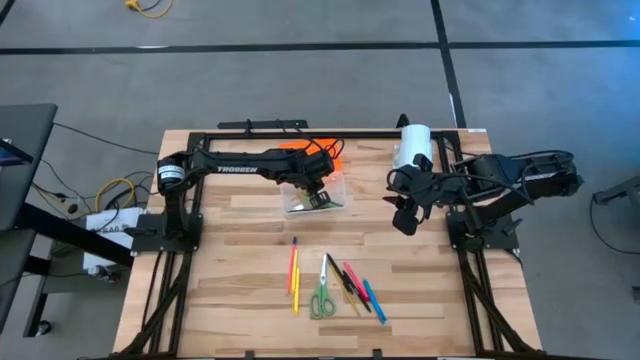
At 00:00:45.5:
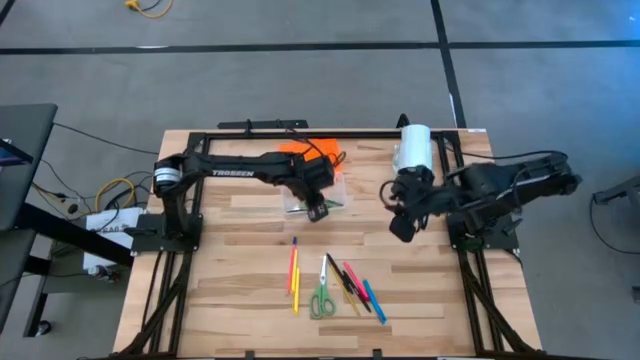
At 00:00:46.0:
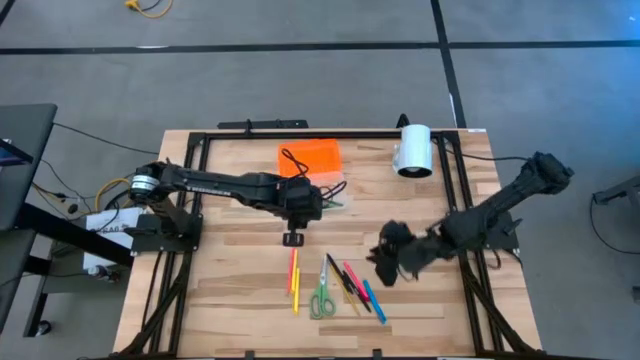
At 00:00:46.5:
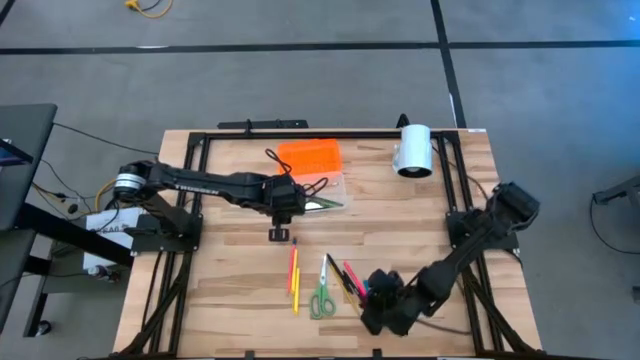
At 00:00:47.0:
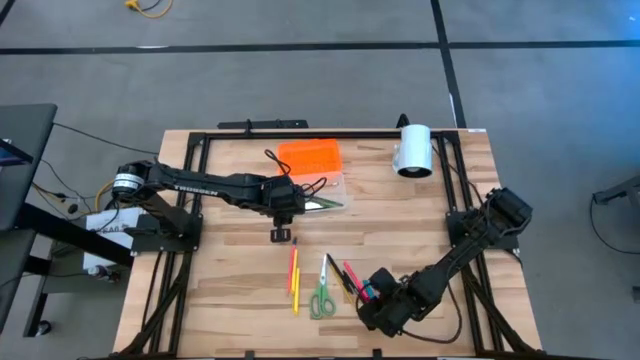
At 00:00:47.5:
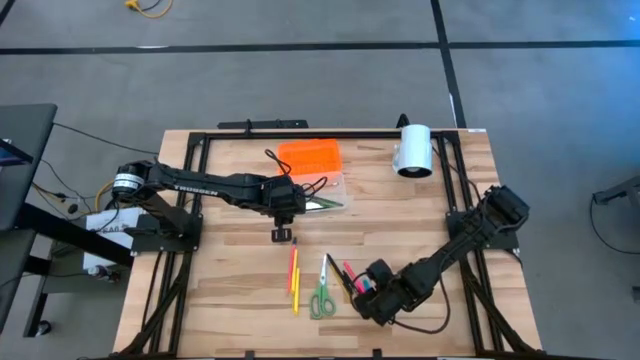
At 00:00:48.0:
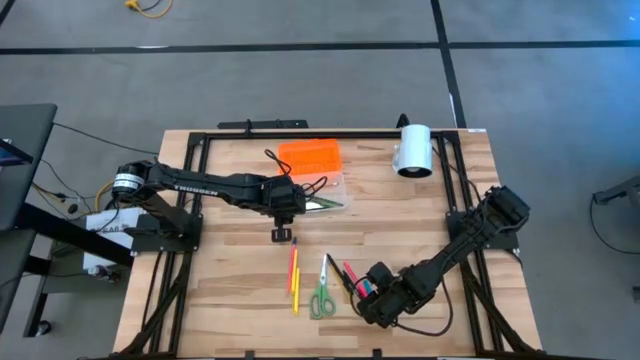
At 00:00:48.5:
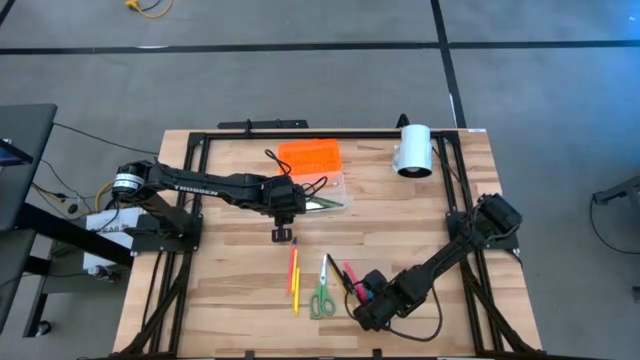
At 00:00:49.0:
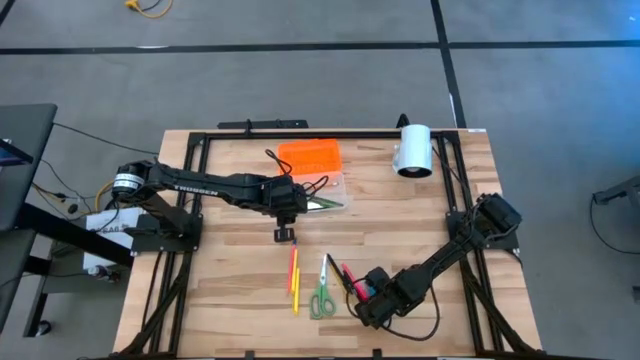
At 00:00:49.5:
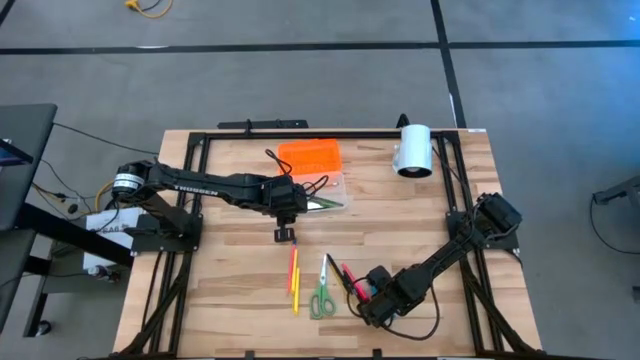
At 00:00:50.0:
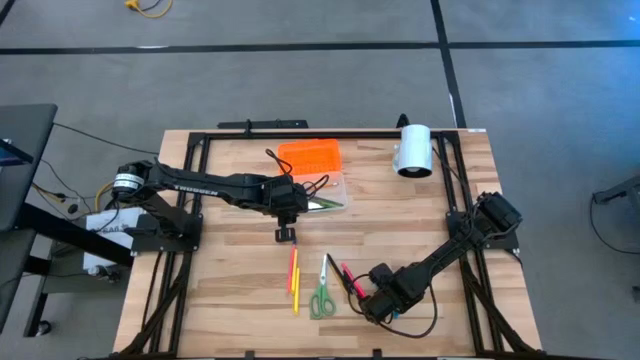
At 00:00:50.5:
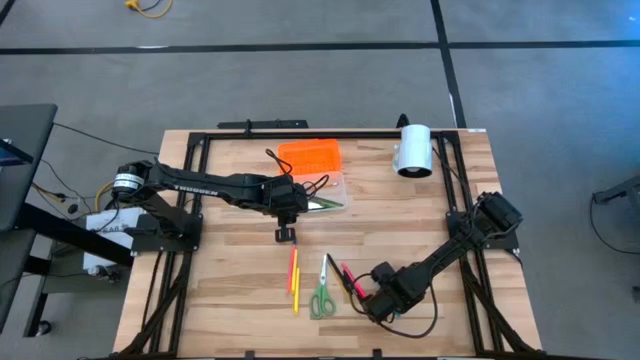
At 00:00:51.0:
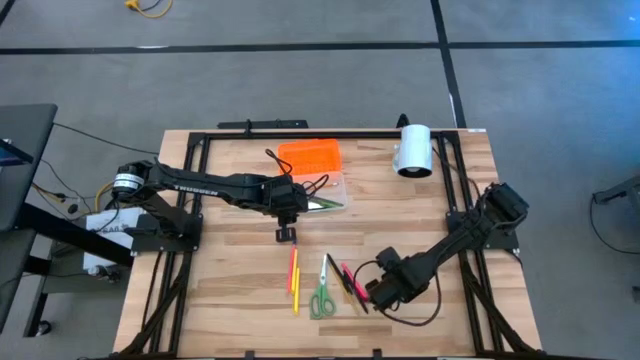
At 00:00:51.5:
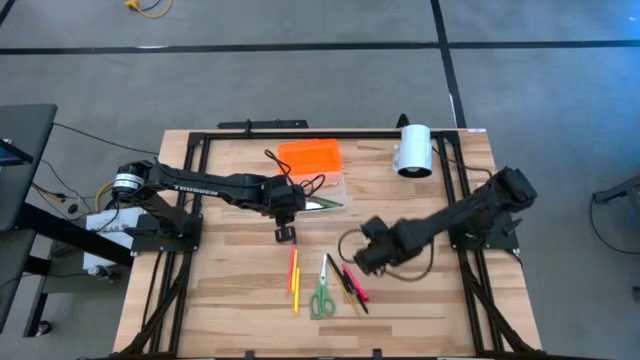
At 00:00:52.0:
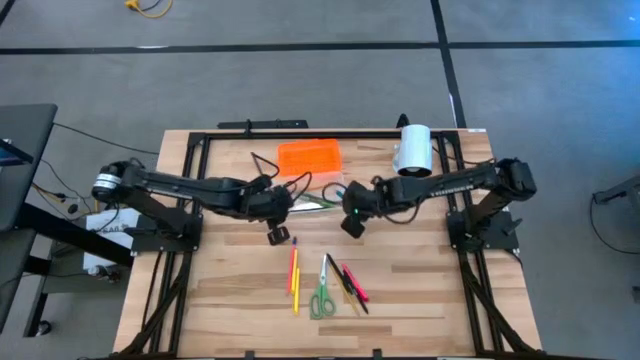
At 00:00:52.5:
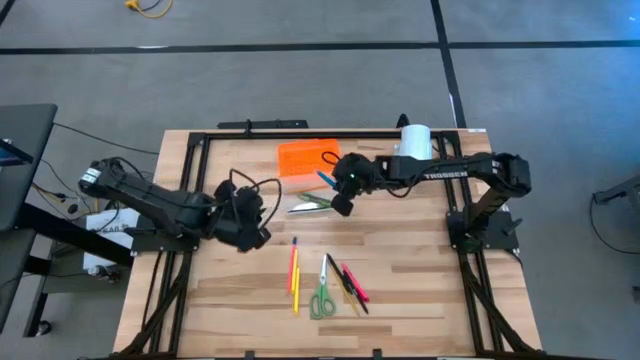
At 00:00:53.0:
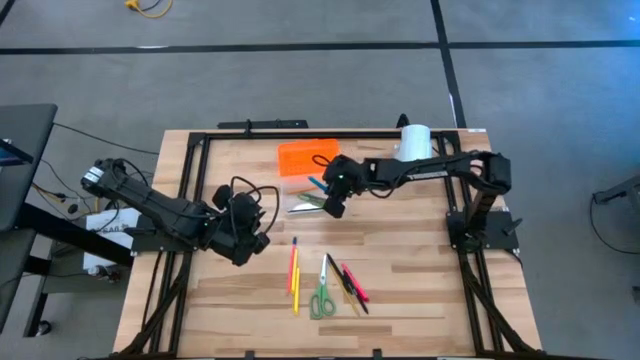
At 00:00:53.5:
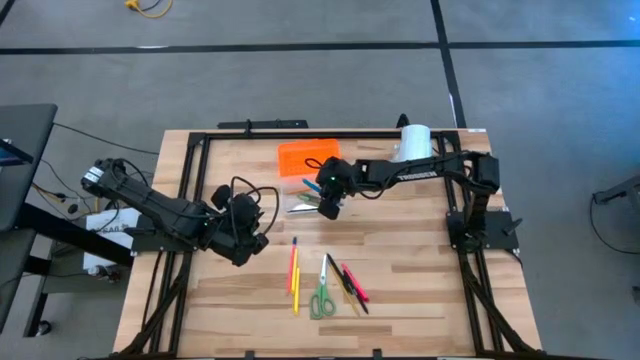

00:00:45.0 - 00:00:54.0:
Task: Pick & place school supplies into a supply box
Put the blue pen into the supply box

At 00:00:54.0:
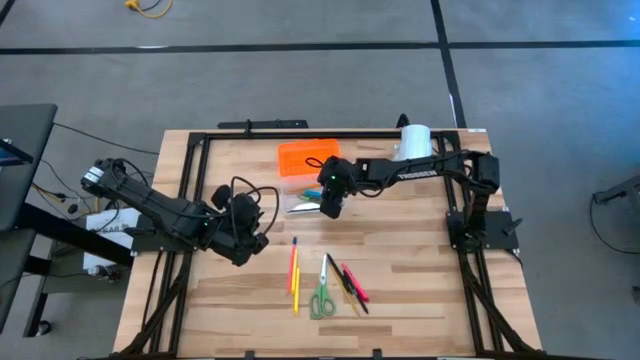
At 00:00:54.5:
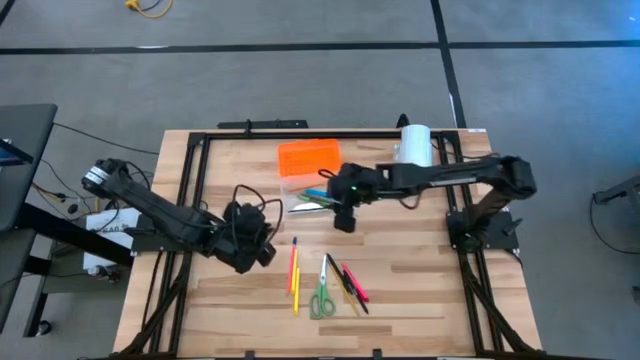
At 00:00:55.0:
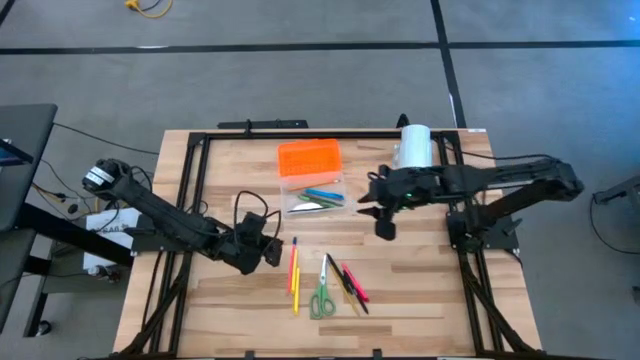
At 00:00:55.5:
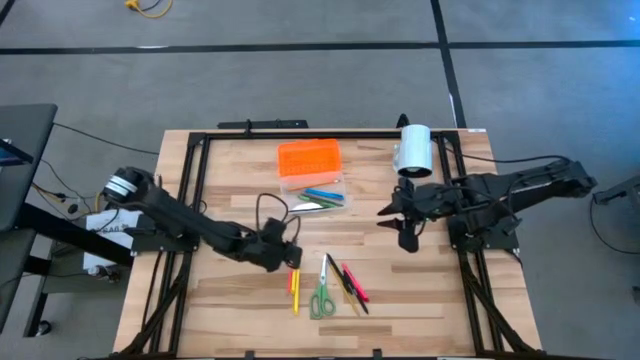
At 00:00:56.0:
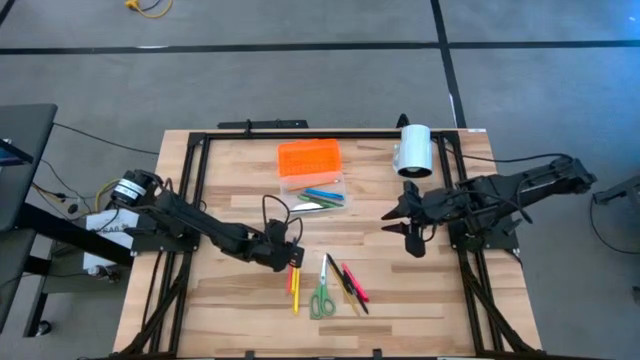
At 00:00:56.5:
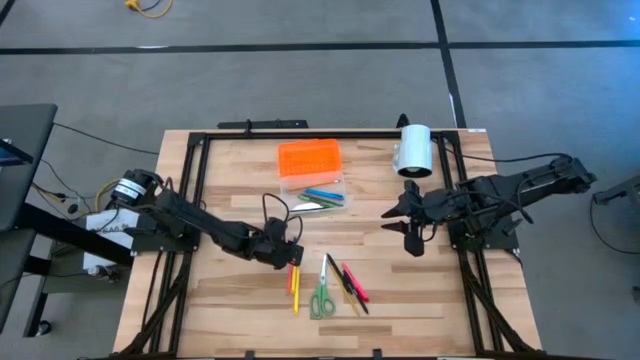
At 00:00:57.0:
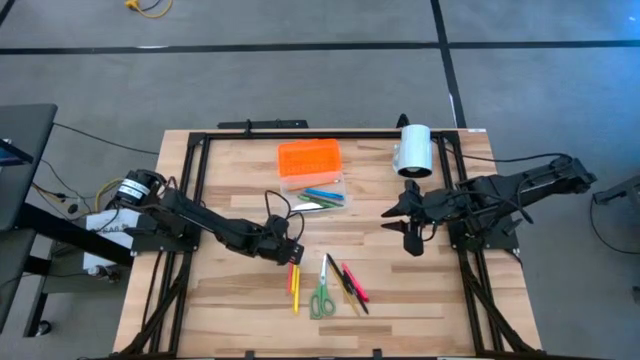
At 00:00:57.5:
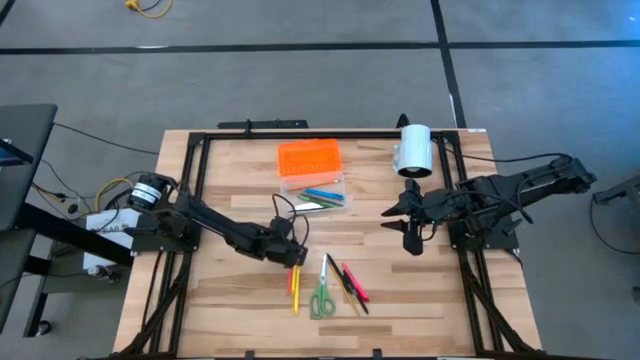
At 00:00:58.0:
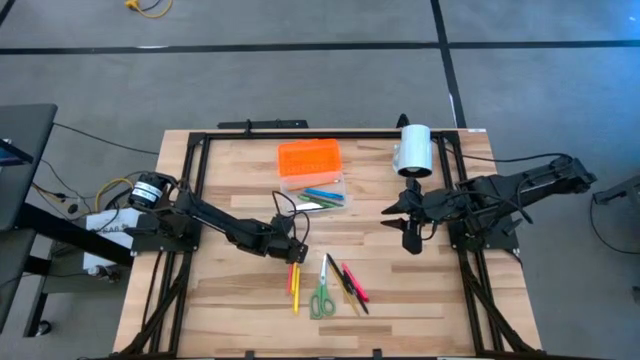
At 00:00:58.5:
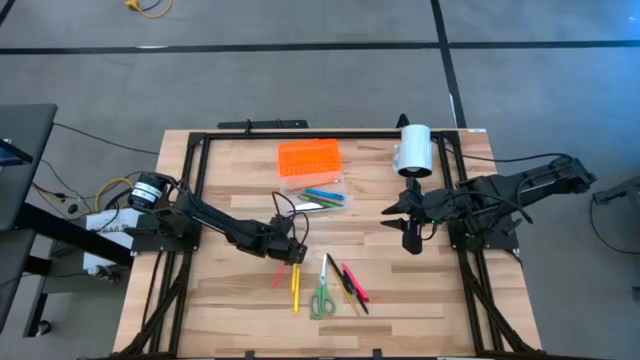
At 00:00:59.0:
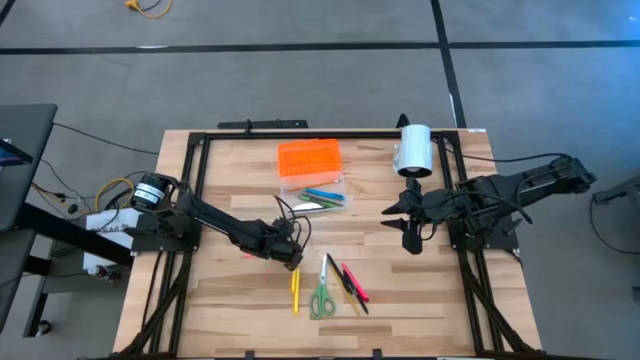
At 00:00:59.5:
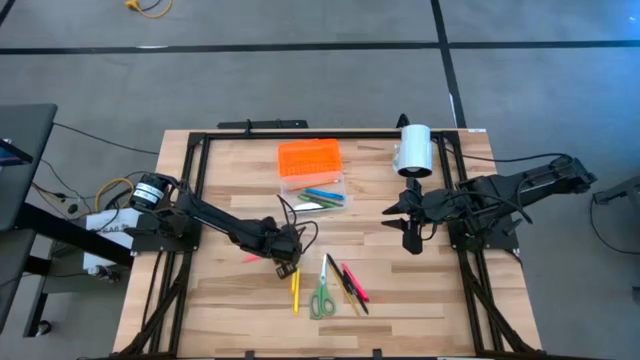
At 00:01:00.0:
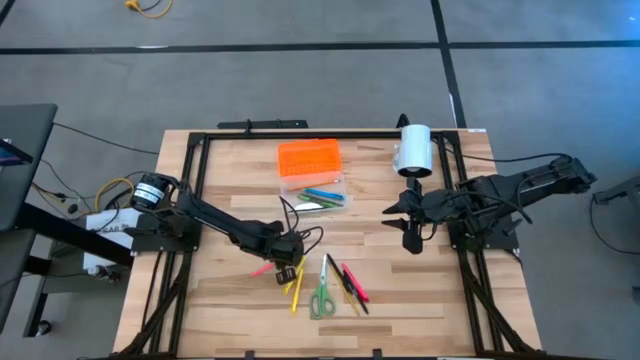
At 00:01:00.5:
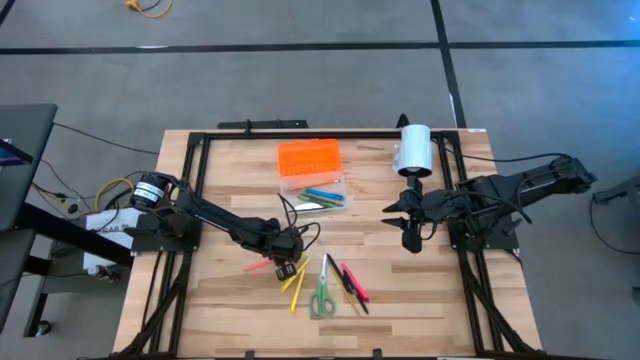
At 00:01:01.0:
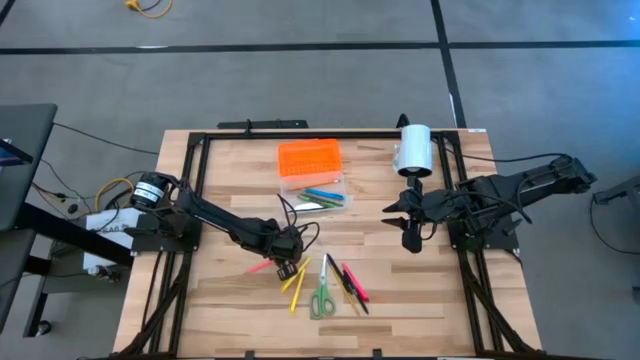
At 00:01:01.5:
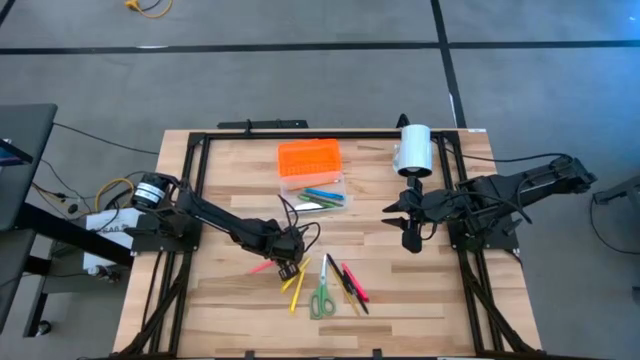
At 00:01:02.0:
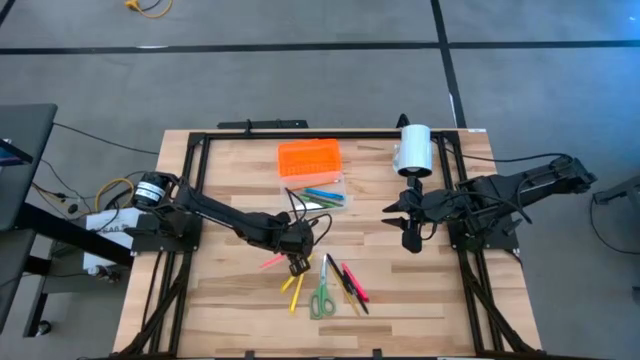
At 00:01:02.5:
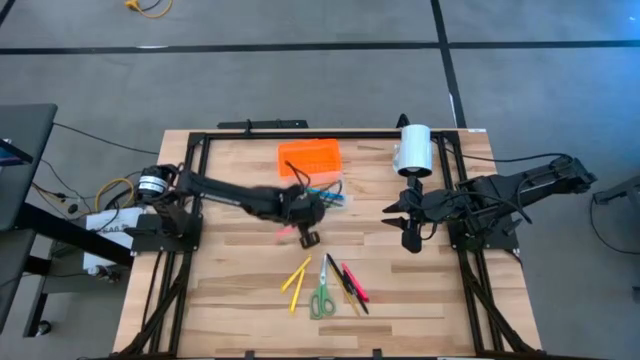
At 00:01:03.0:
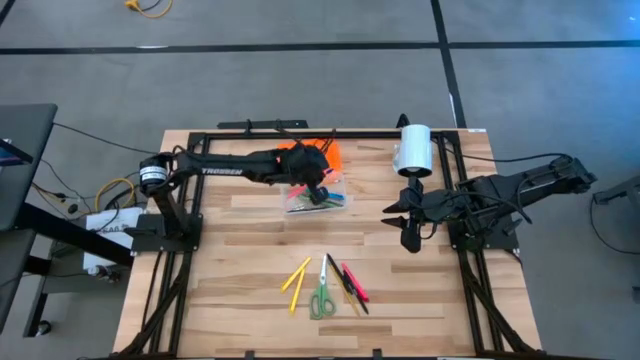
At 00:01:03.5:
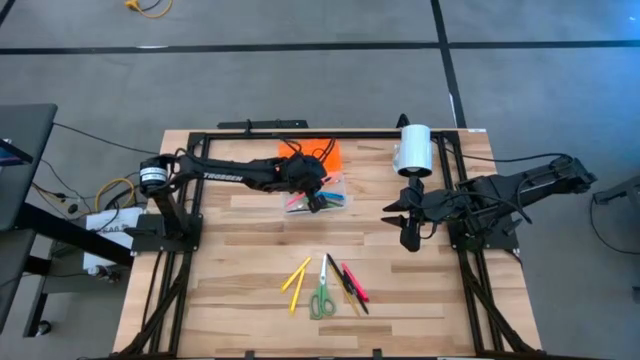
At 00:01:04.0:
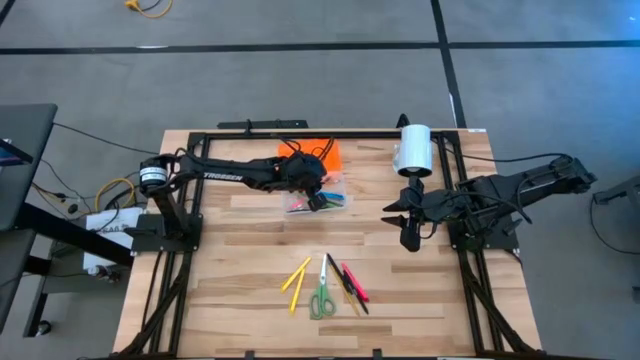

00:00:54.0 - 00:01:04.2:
Put the pink pencil into the supply box

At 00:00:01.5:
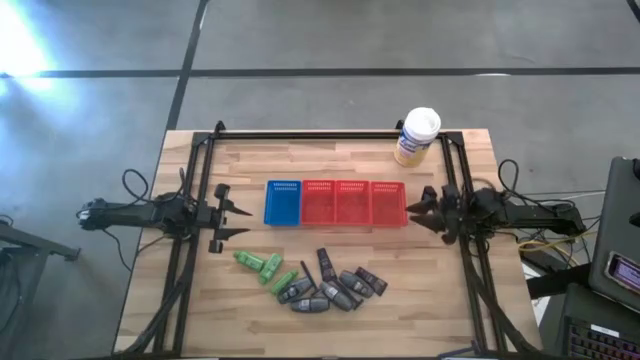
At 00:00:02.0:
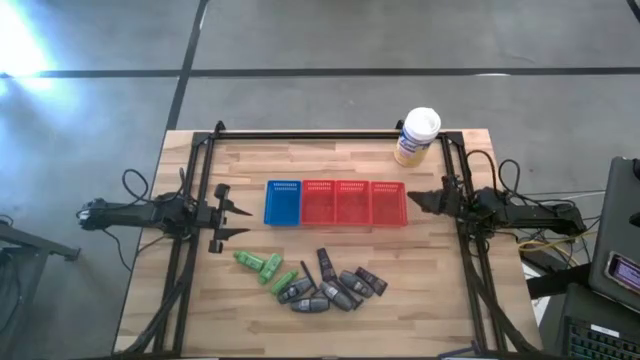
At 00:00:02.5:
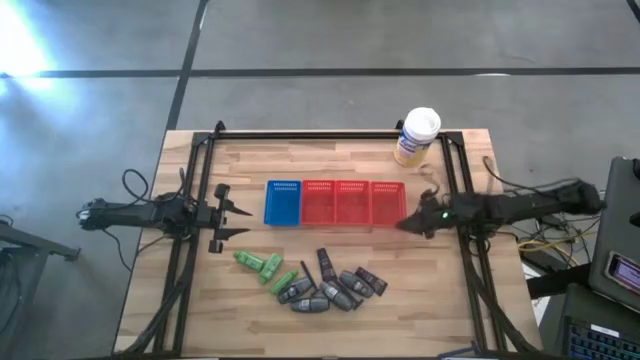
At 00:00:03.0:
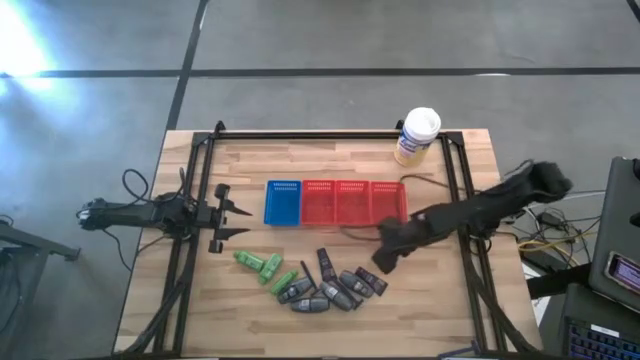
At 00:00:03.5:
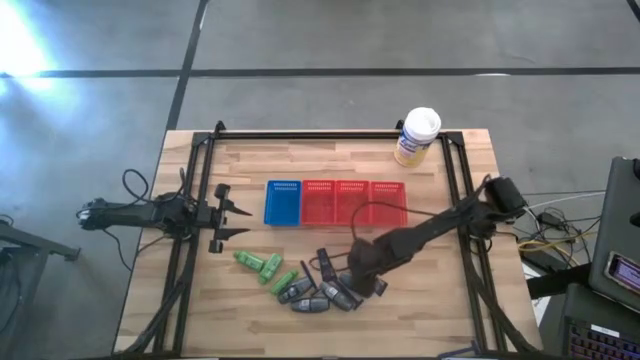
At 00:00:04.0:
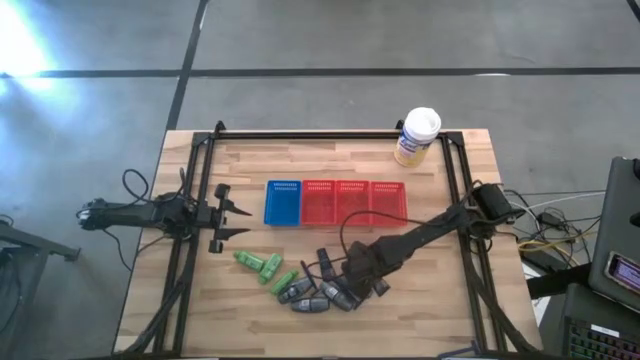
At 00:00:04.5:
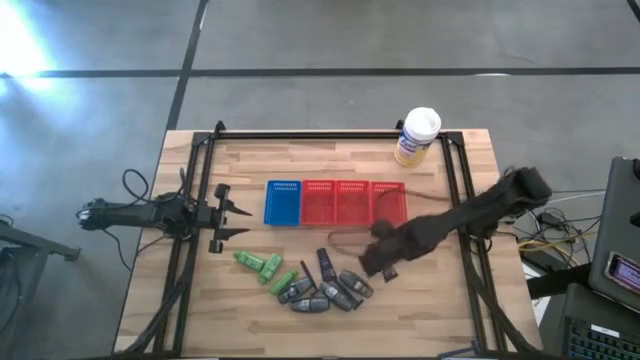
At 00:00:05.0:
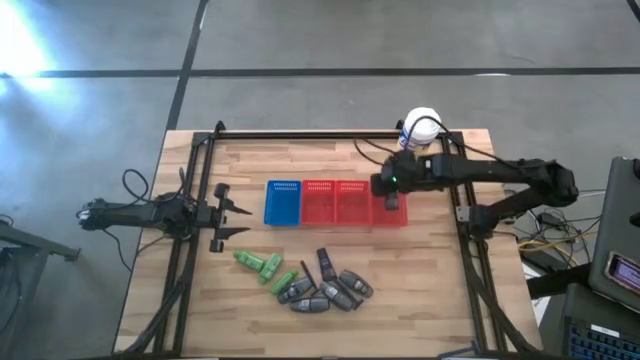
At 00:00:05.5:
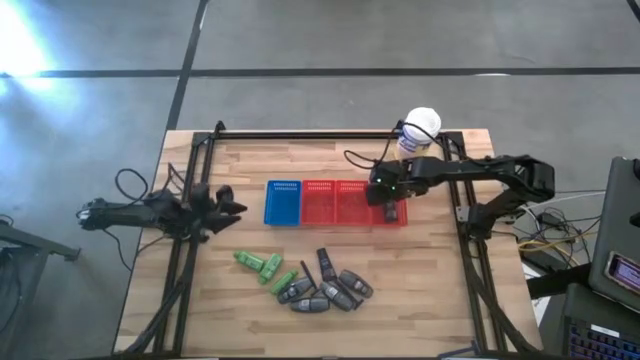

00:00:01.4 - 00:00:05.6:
Task: Pick & Place Travel size toiletries
Put the blue shave cream into the right red bin
